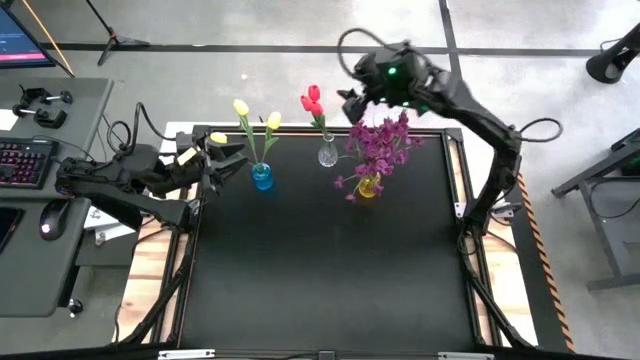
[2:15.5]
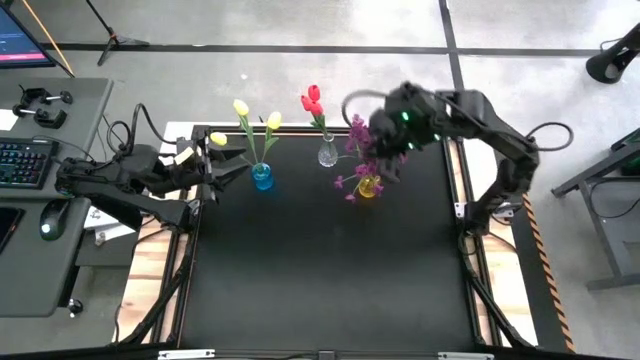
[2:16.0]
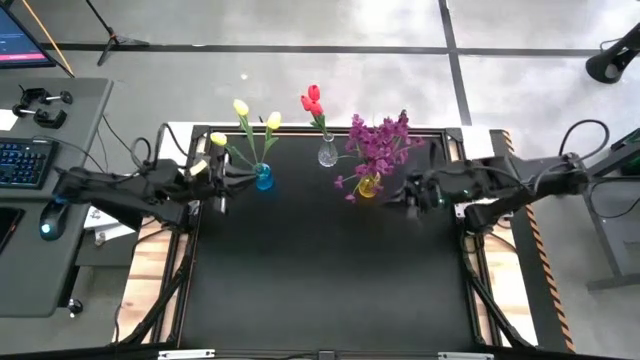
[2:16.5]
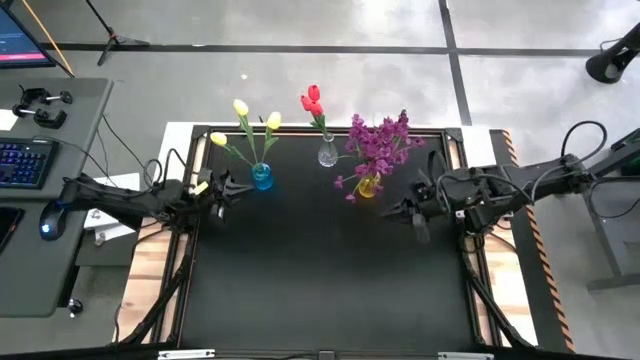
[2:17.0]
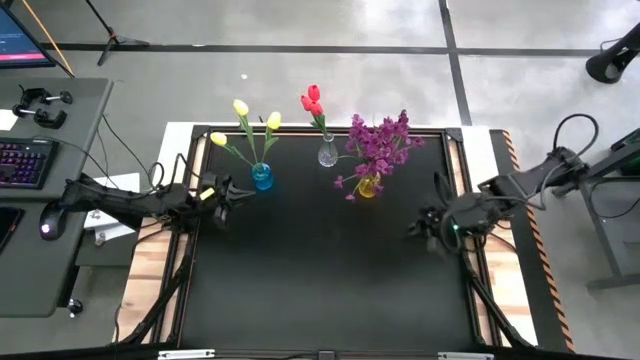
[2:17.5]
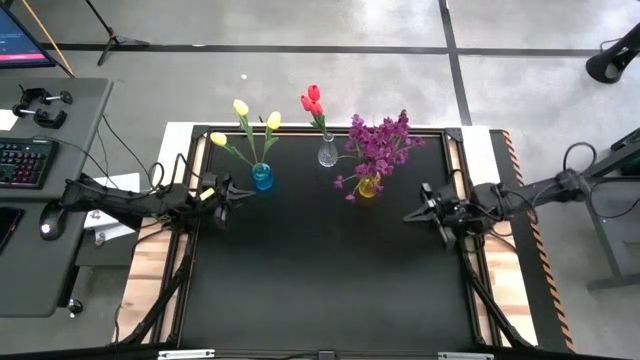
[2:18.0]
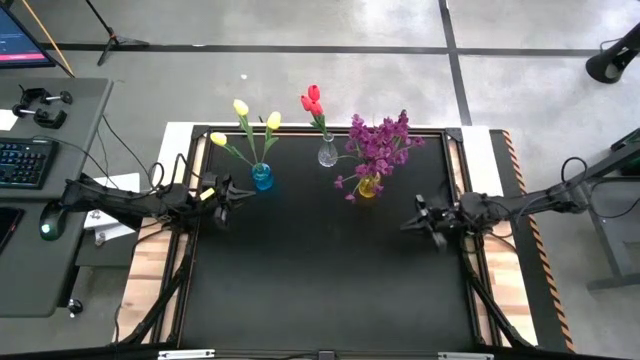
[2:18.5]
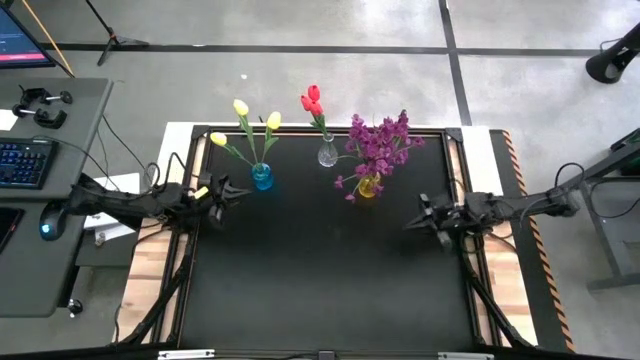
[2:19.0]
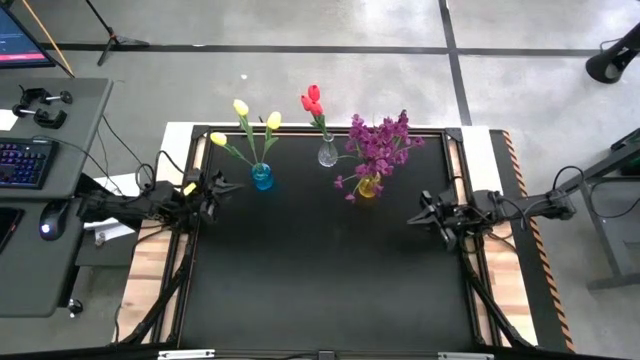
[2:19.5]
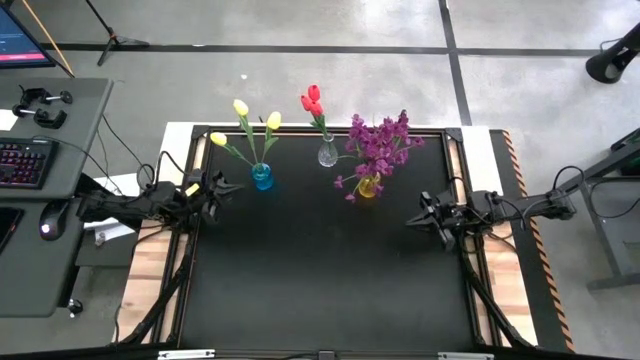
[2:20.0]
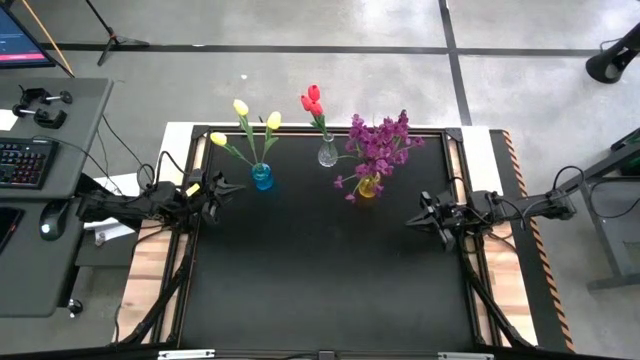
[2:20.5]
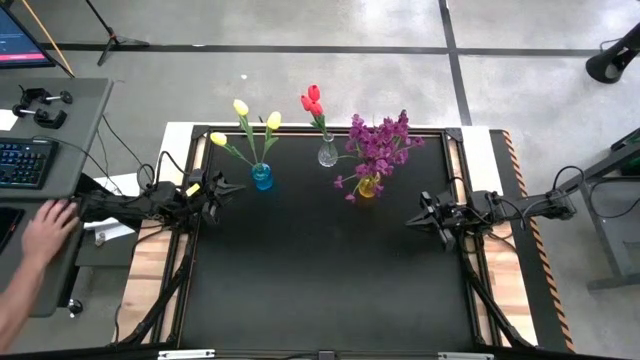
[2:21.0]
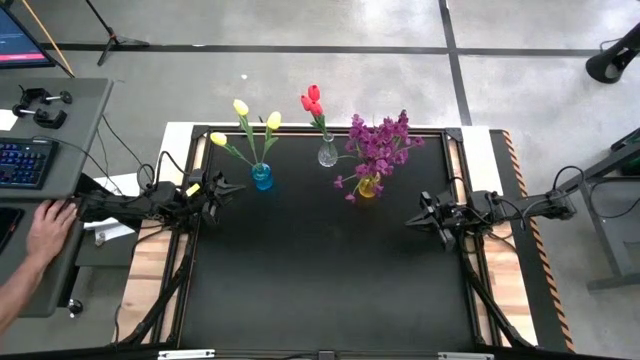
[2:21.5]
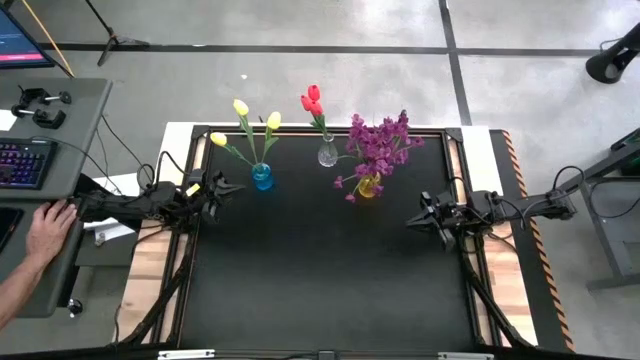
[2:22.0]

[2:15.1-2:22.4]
Task: Sort flowers into vase by color
Return to Home Position

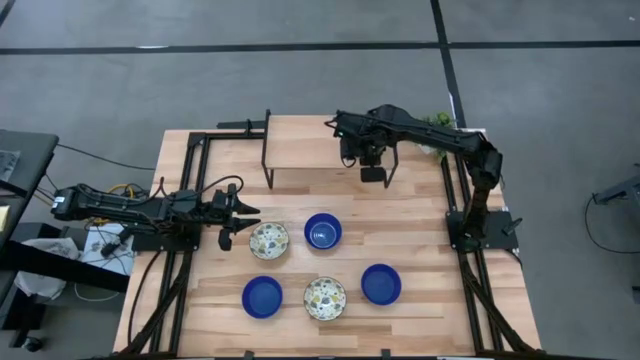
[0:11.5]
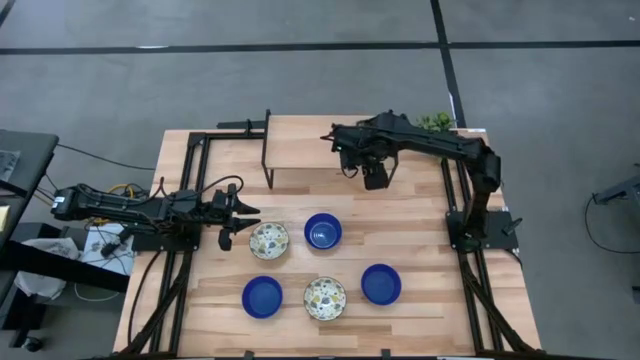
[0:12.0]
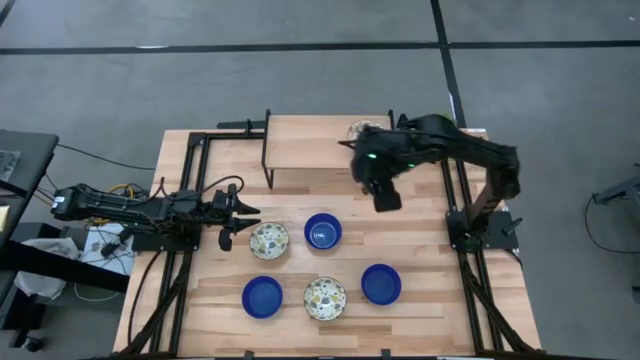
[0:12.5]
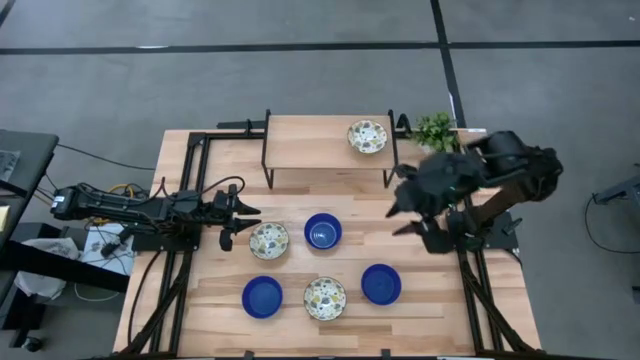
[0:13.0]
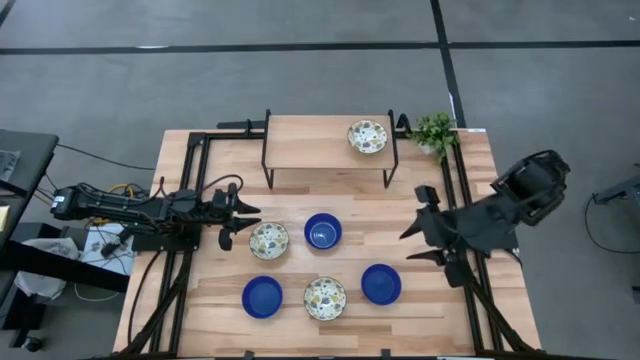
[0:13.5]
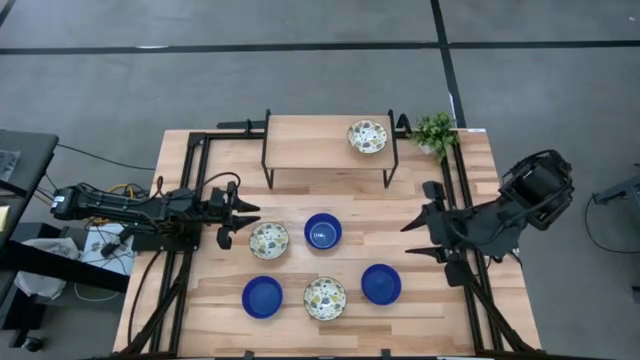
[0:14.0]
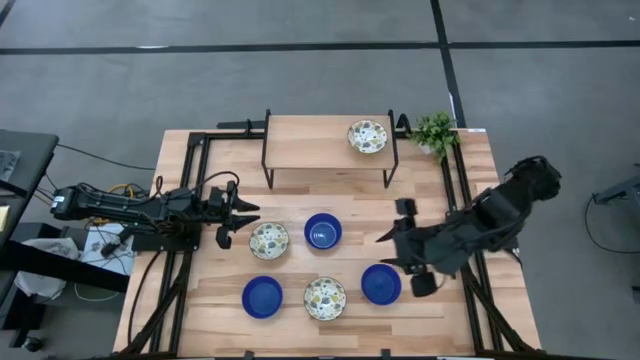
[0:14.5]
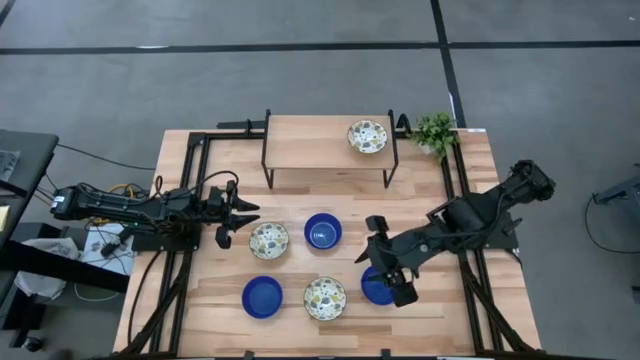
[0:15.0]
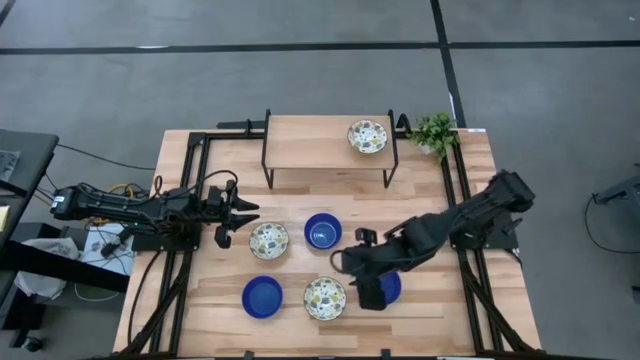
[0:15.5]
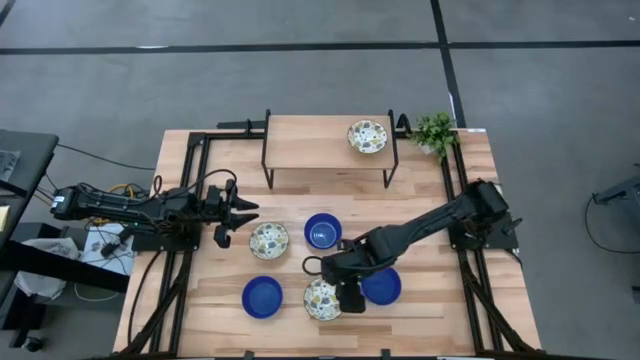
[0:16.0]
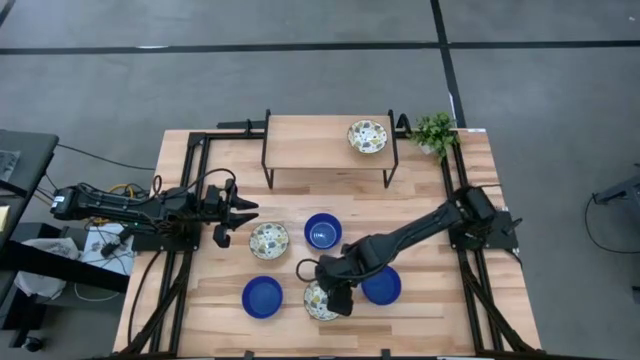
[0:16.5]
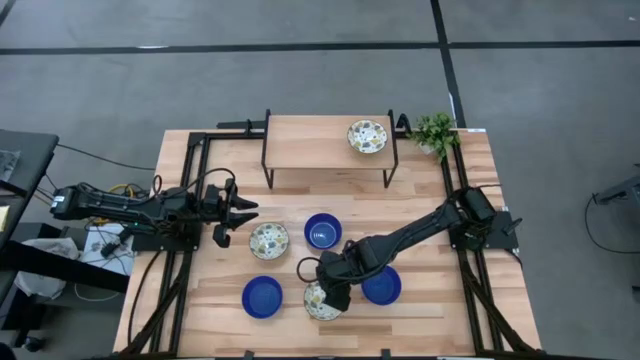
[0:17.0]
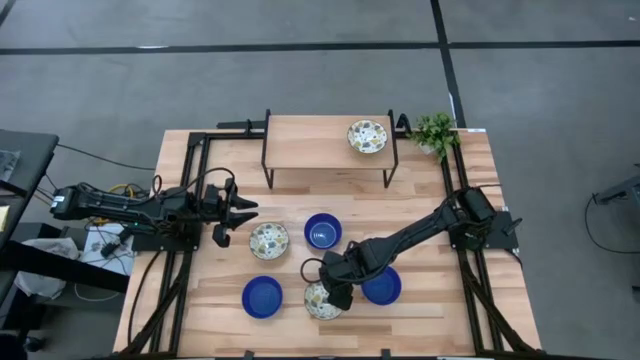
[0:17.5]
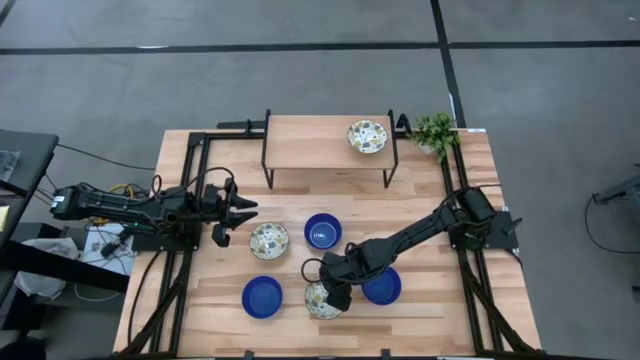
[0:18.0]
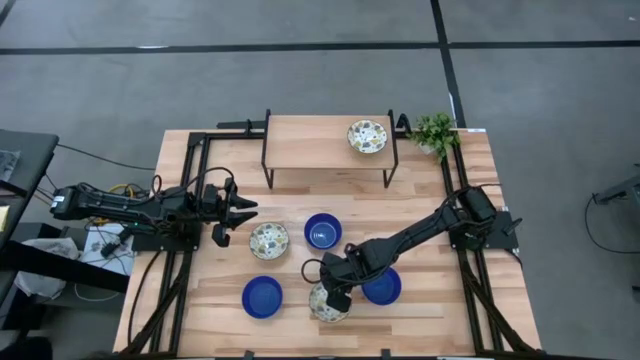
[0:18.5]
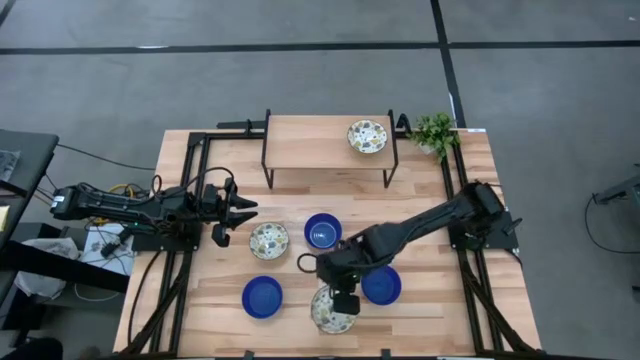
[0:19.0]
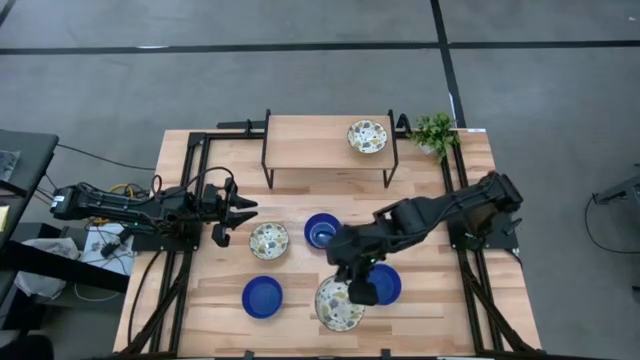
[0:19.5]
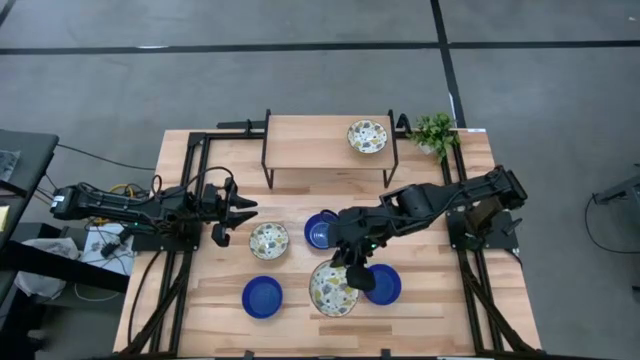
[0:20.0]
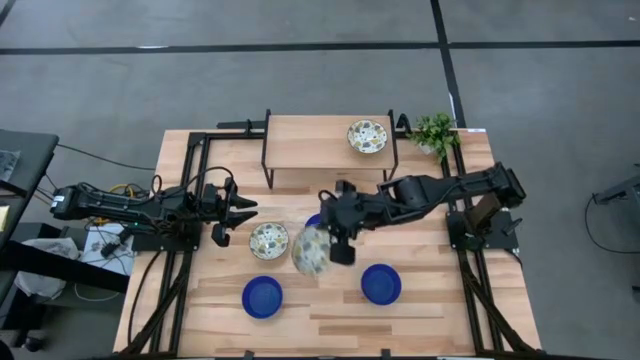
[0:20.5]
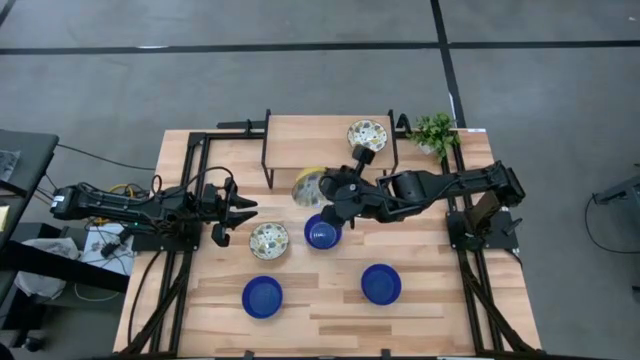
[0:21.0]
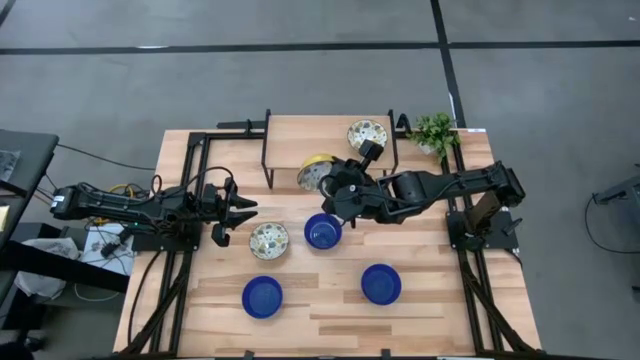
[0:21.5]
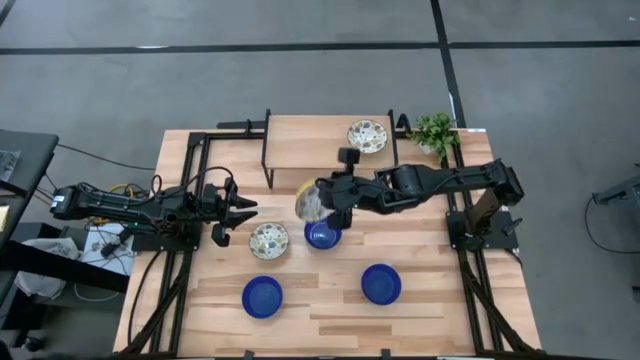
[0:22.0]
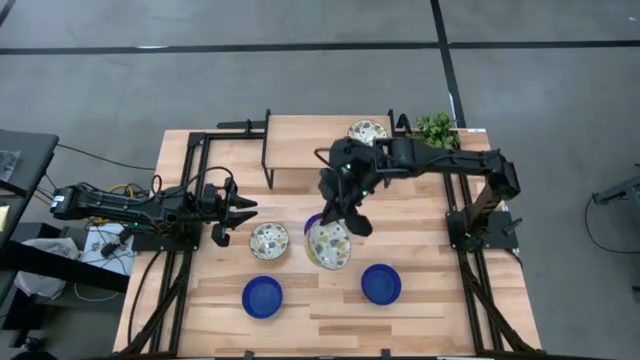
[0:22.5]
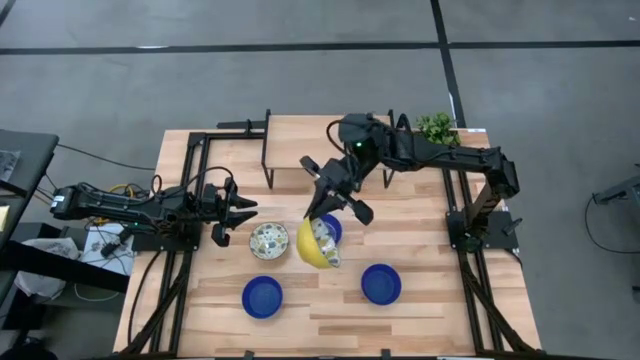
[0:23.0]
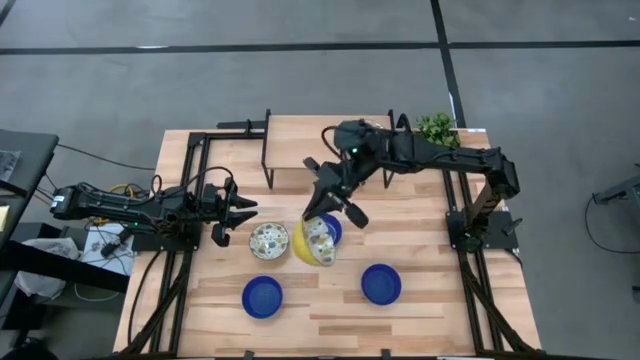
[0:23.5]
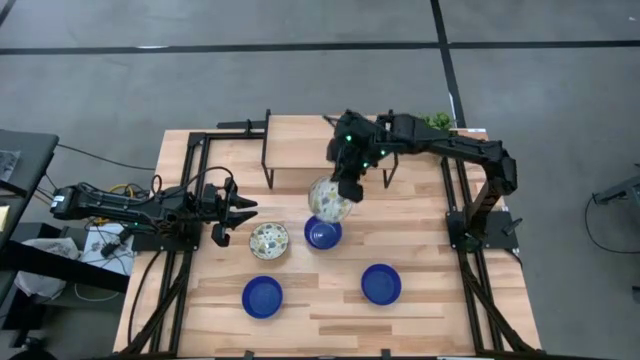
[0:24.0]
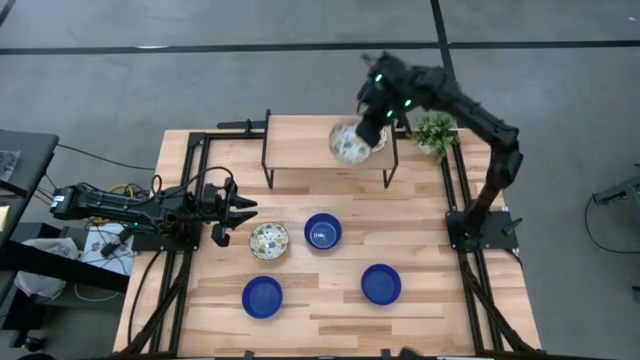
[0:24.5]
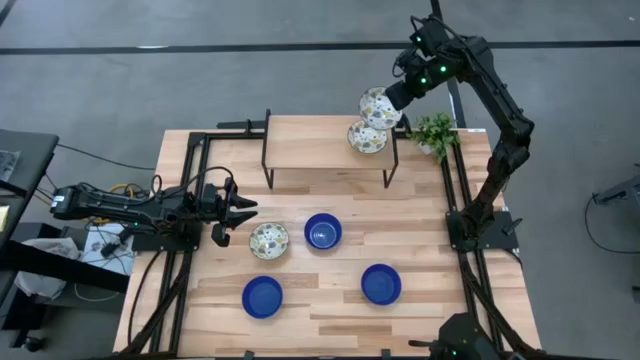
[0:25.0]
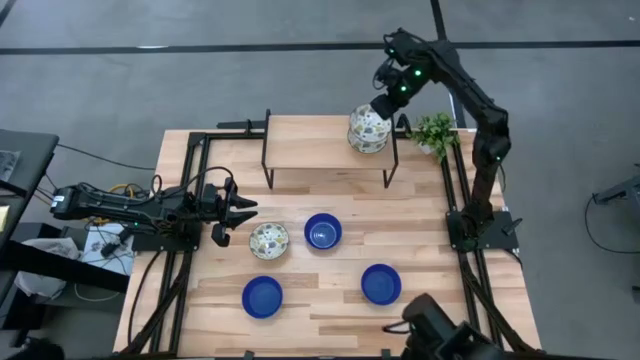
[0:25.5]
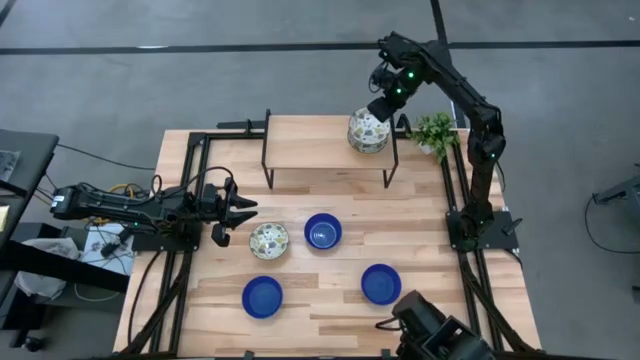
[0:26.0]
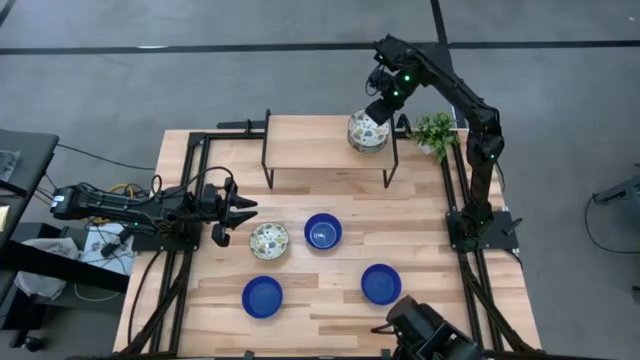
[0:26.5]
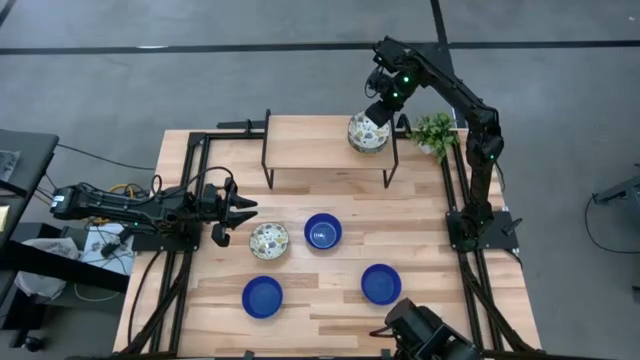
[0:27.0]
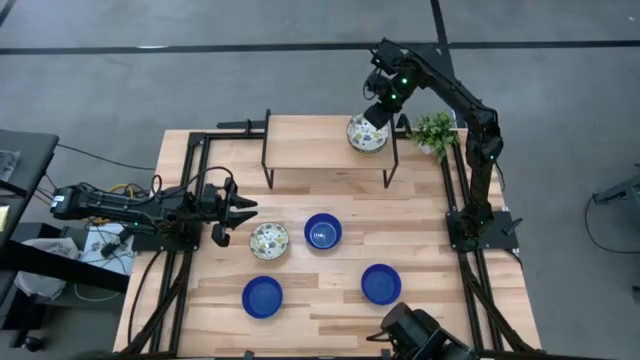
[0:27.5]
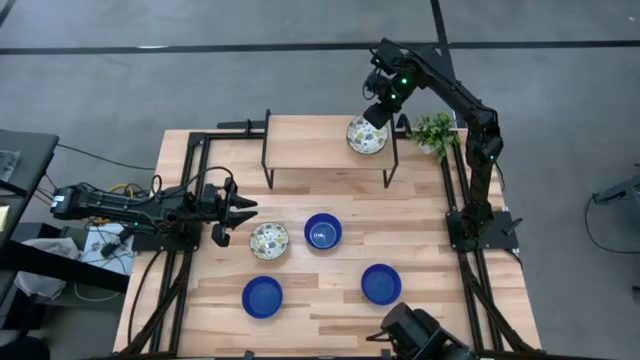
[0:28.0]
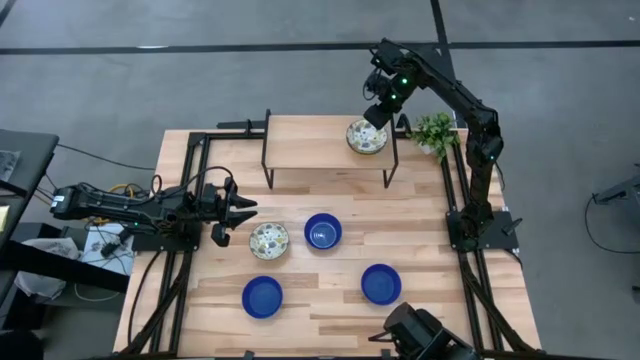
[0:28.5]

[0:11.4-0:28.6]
Task: Pick & Place Mini bowls
Stack the bottom yellow patterned bowl on top of the other yellow patterned bowl on the shelf
